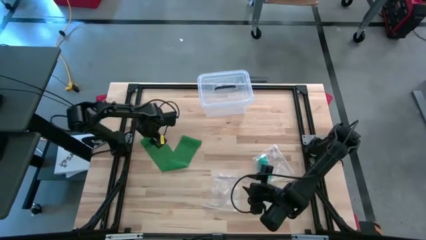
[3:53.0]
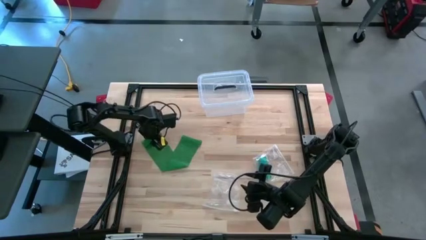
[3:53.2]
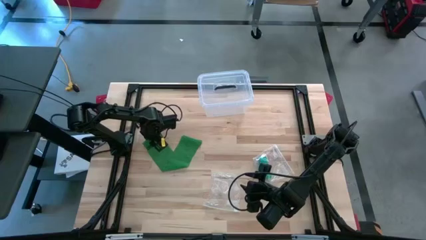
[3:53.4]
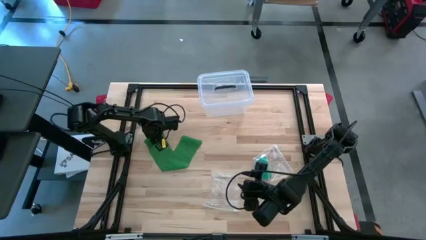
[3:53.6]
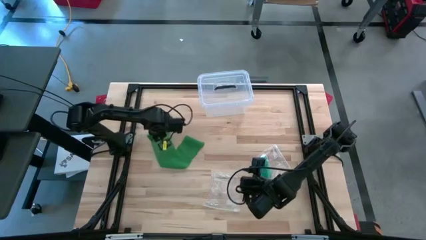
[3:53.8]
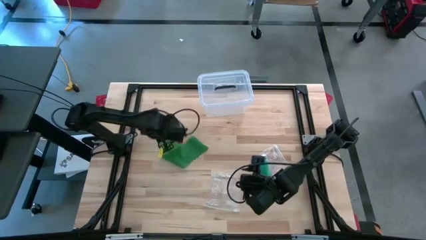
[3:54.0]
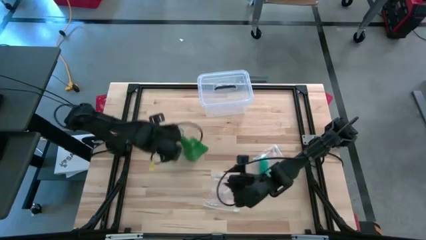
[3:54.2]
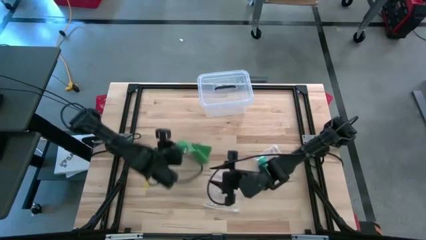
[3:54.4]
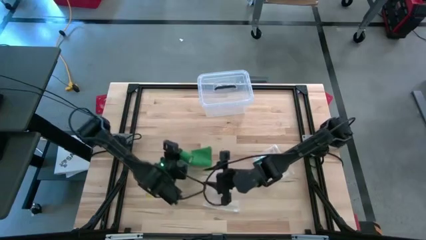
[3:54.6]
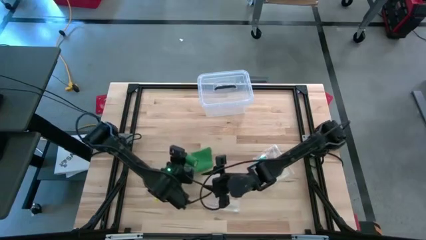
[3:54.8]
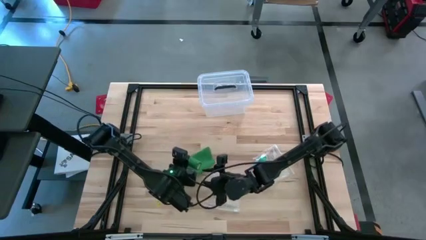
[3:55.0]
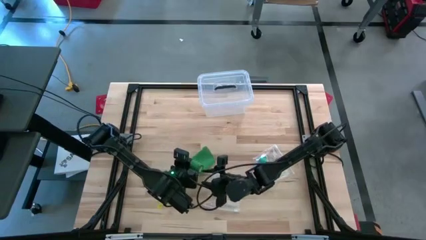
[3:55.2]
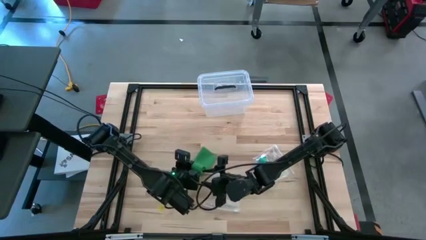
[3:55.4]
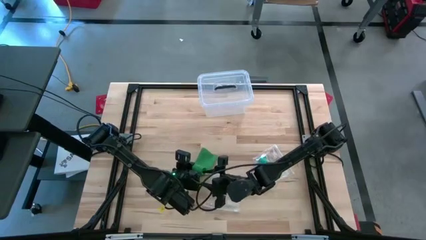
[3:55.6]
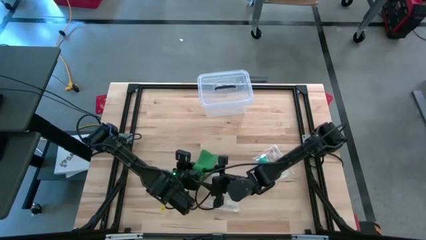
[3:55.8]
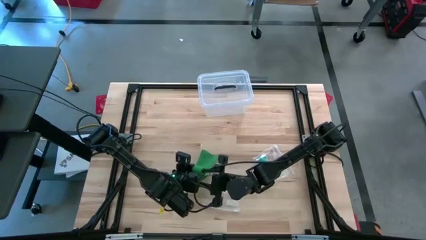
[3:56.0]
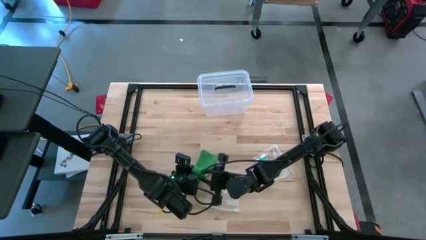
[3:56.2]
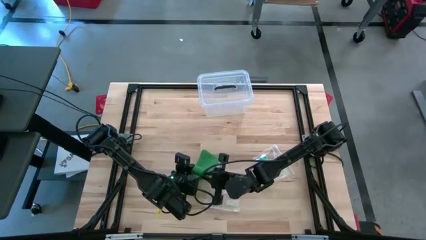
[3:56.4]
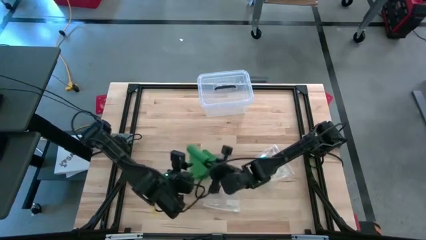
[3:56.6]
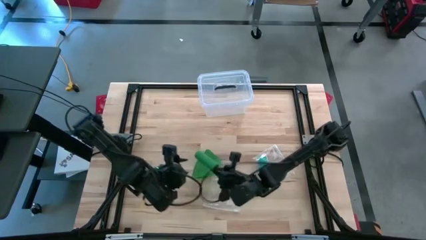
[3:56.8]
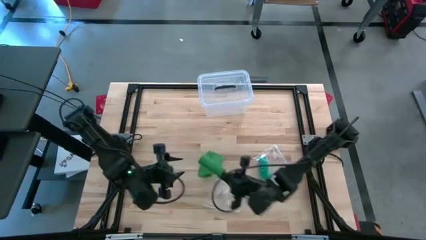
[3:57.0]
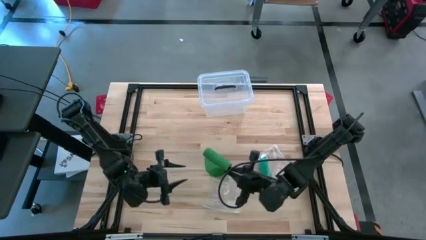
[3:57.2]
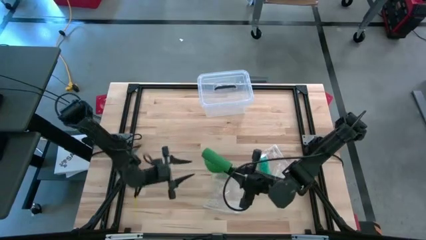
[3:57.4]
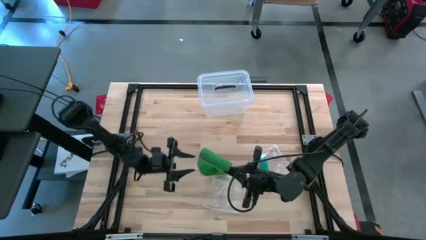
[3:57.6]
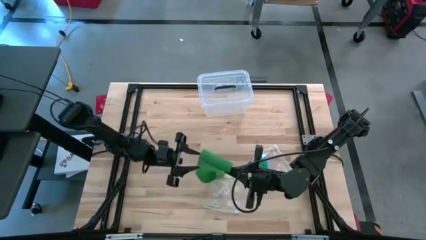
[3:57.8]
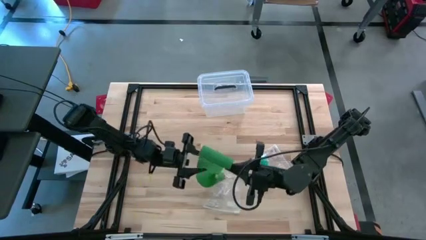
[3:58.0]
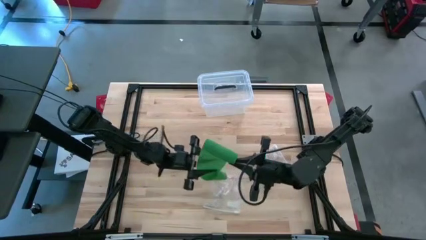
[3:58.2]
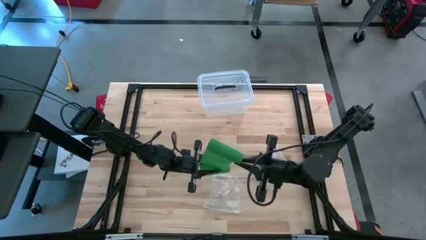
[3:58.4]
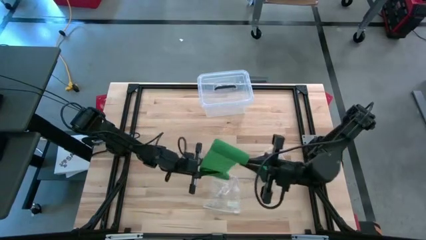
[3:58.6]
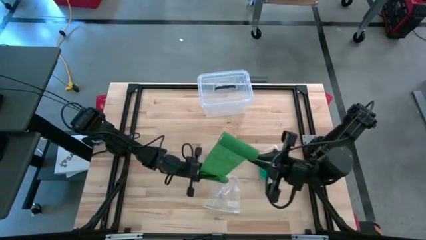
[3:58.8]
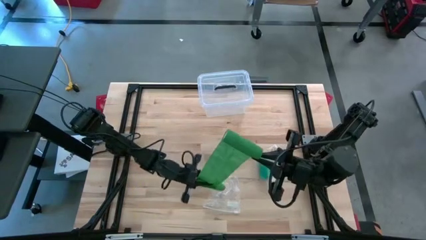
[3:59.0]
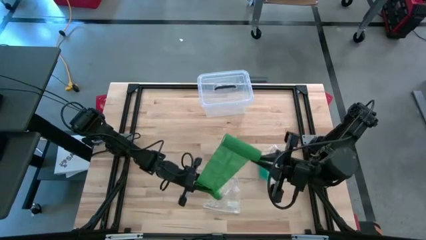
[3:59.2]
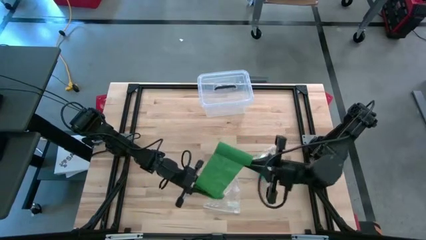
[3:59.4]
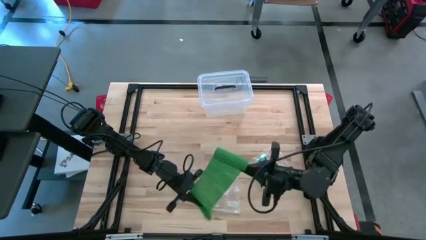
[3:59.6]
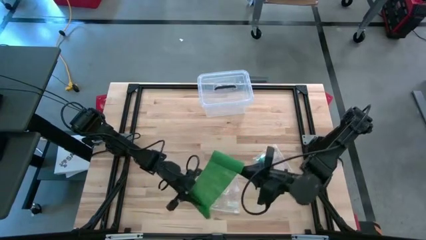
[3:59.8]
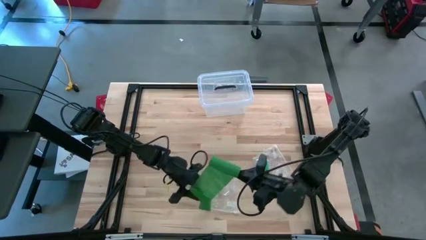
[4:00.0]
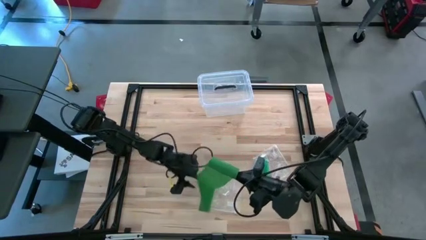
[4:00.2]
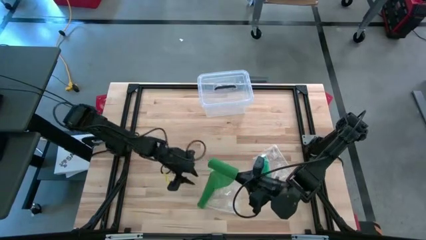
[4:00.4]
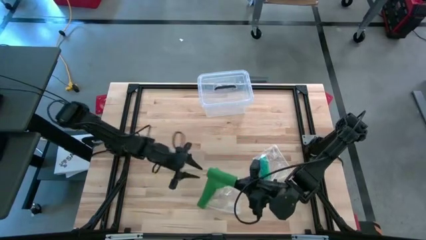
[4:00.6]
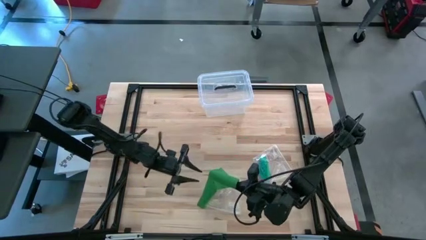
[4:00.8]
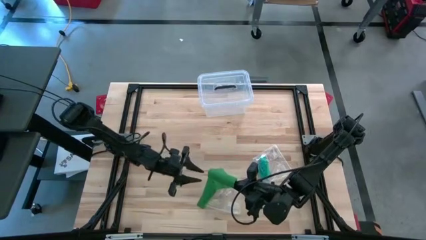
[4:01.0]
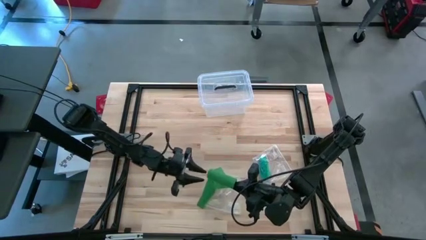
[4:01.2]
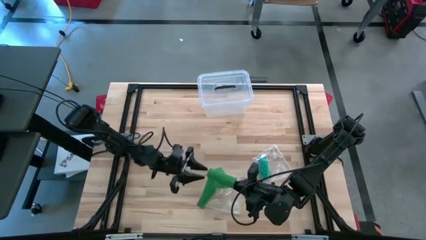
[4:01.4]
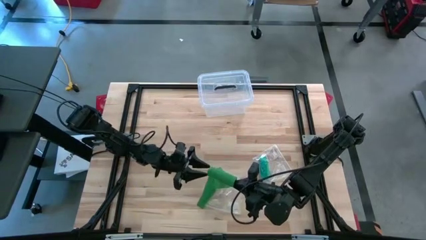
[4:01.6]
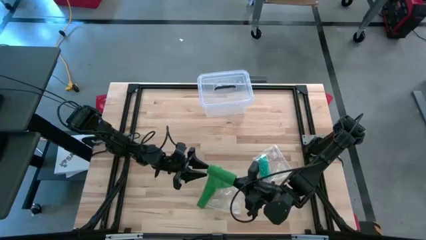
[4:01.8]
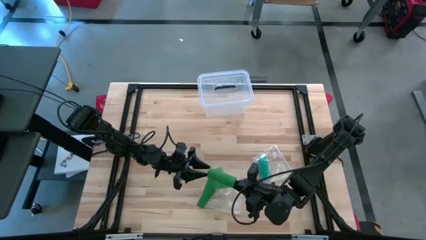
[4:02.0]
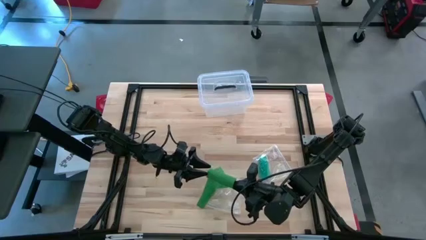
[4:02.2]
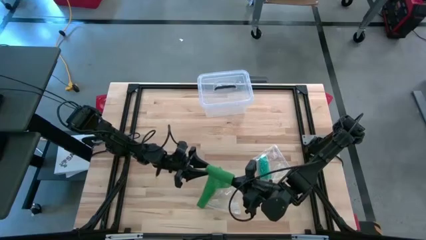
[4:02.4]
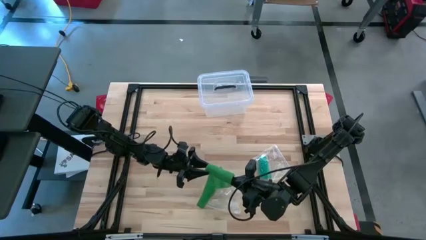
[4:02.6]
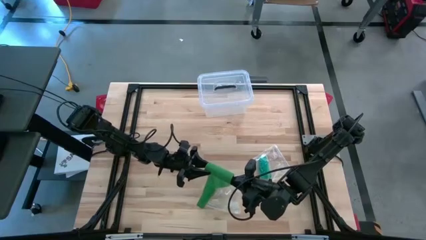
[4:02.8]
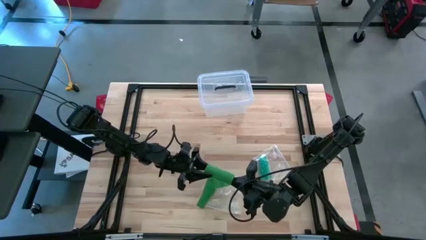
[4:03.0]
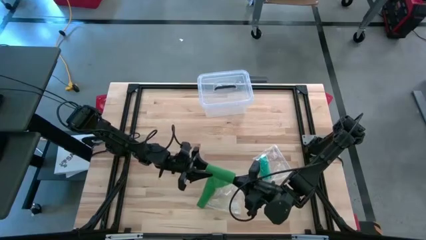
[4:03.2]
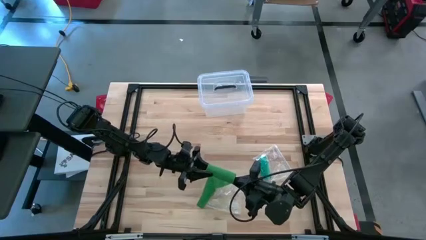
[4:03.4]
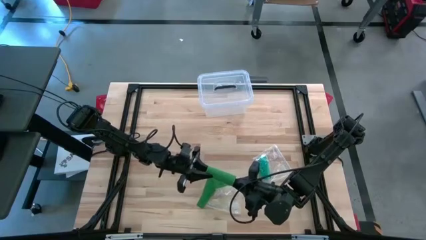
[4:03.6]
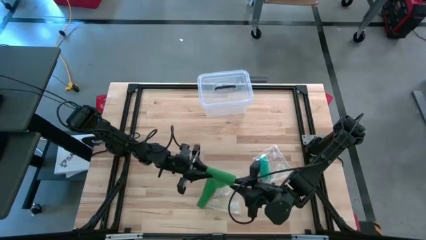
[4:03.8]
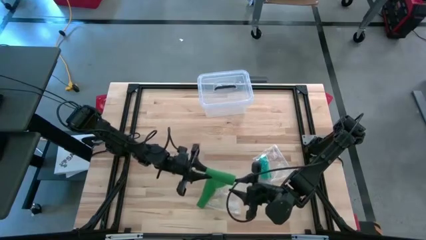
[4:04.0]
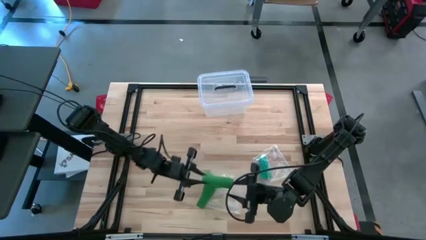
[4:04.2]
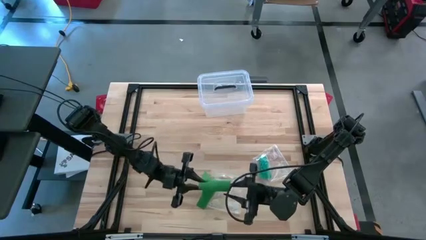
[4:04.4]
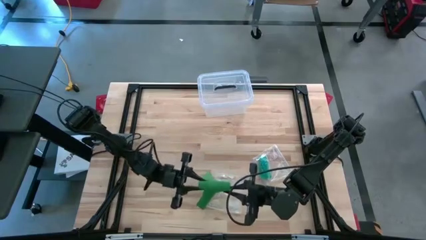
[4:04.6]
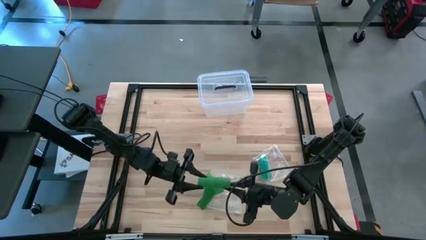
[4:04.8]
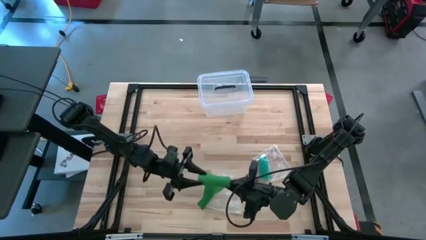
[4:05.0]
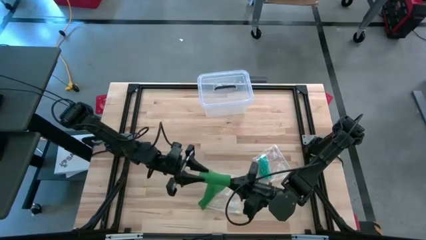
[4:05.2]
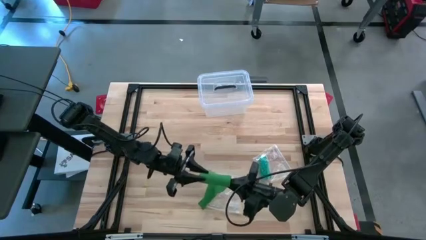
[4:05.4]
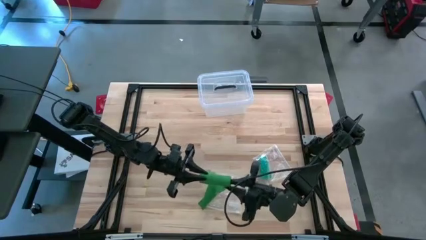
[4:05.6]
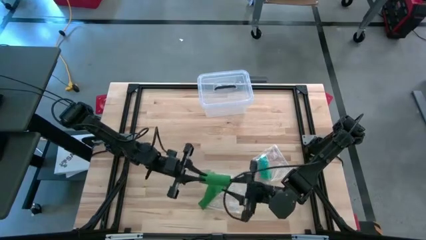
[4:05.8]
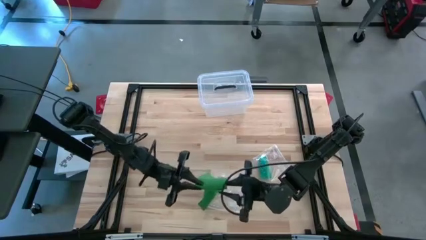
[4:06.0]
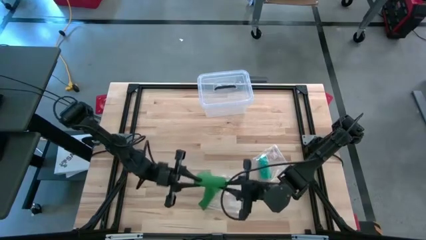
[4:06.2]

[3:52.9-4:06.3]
Task: Roll bandage
Roll the green bandage

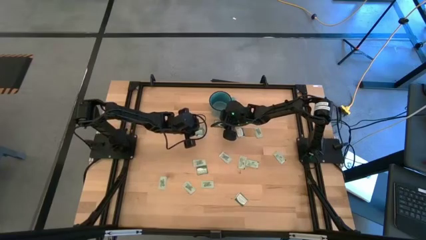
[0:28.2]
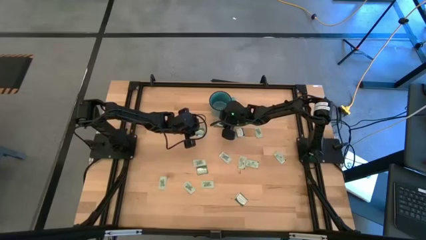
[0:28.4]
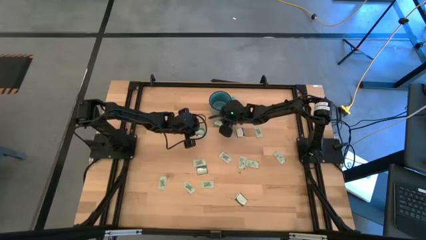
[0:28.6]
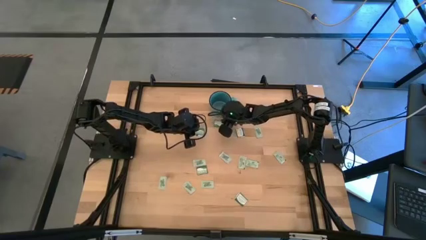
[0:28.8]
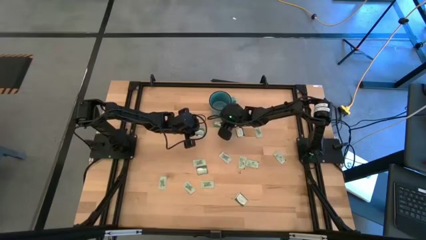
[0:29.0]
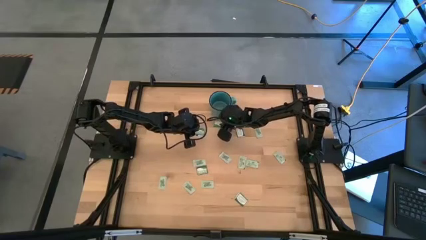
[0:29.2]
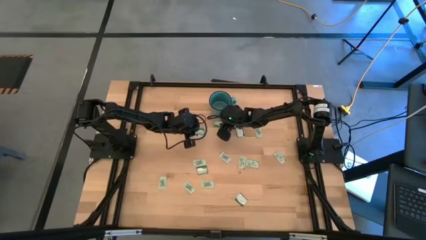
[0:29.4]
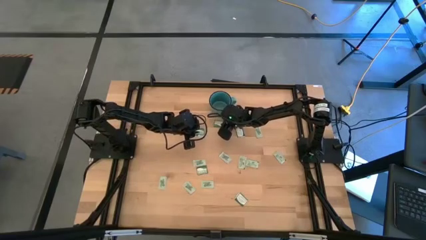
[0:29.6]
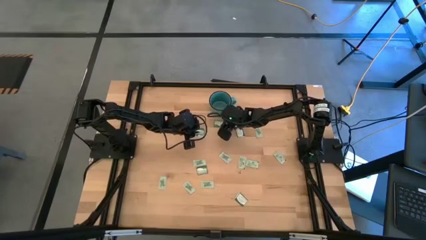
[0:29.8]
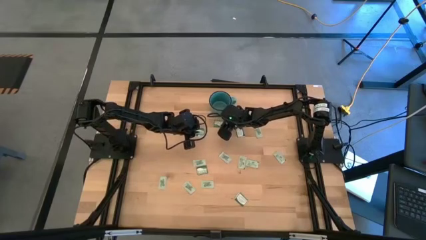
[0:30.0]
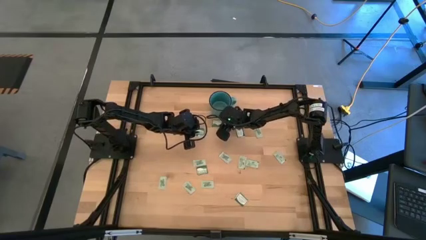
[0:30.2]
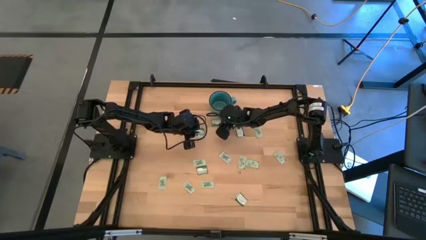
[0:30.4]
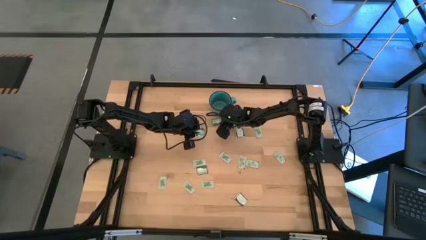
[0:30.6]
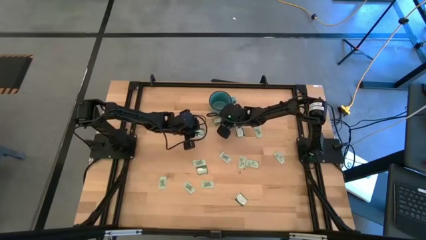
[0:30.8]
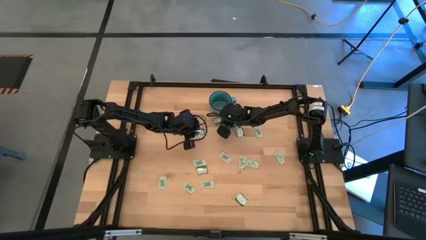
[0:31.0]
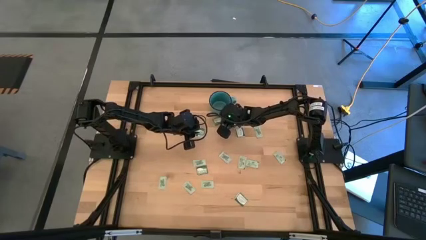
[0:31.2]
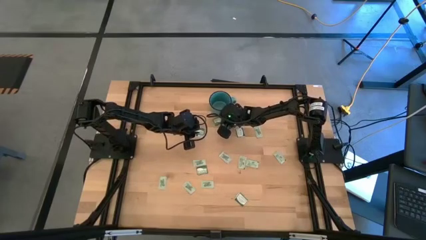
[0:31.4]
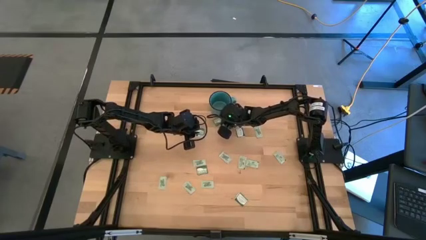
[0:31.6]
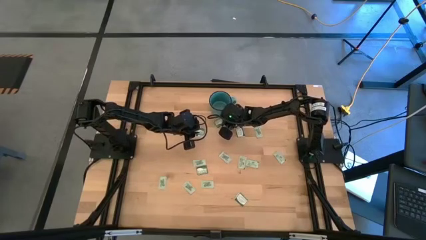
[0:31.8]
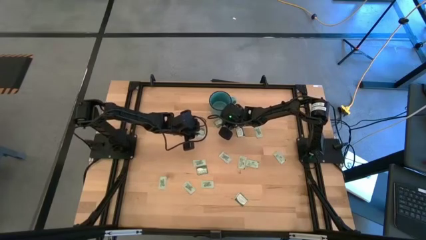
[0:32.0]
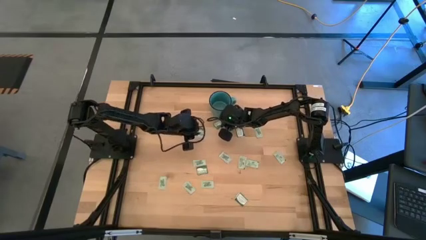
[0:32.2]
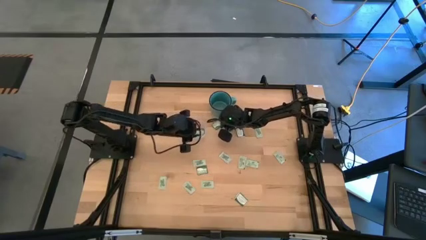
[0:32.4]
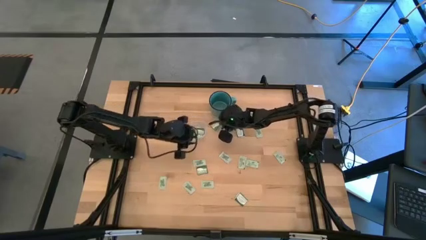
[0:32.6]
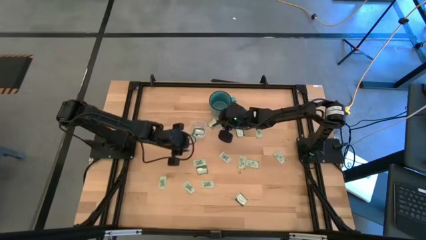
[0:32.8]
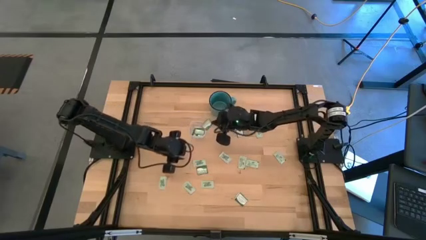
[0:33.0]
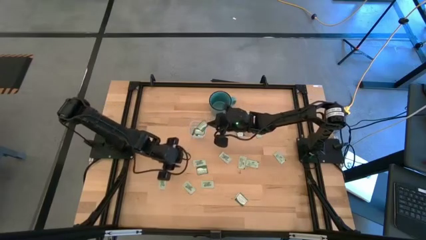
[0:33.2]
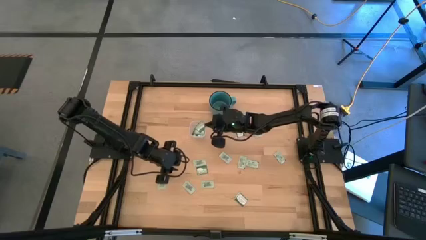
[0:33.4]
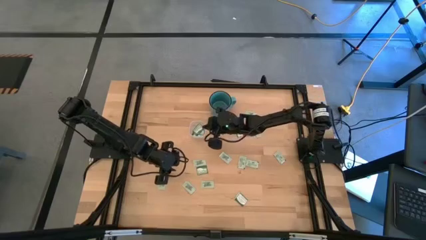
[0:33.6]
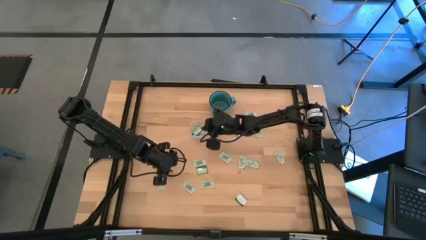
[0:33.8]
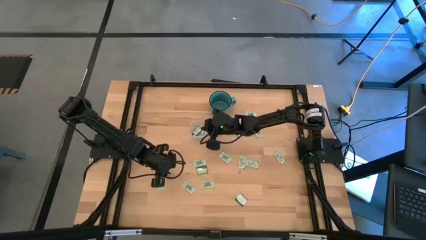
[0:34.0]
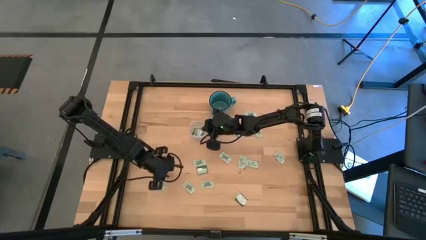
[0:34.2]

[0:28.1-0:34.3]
Task: Pick and place Stevia / Truvia into bins
Put the dark green truvia packet into the transparent container
